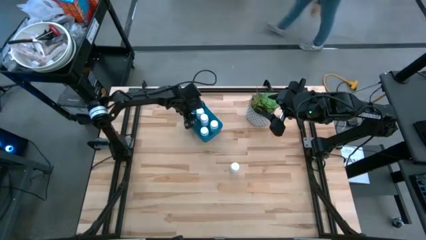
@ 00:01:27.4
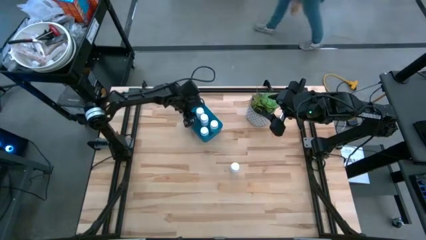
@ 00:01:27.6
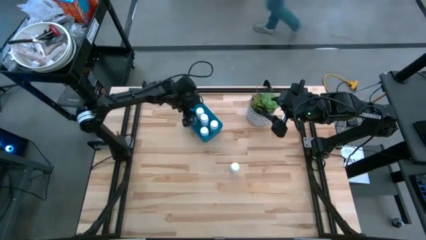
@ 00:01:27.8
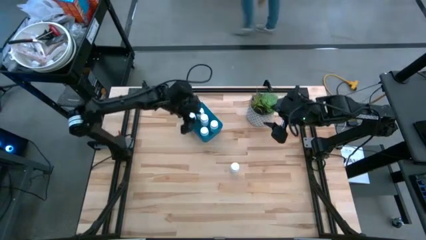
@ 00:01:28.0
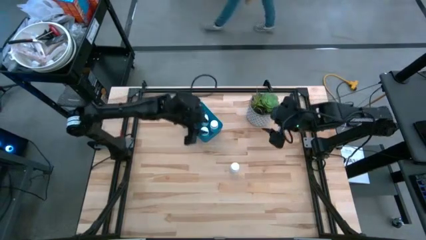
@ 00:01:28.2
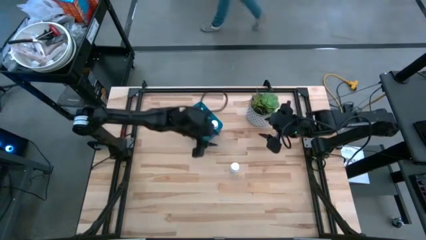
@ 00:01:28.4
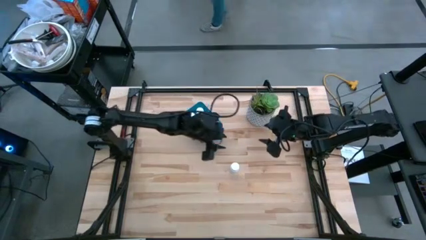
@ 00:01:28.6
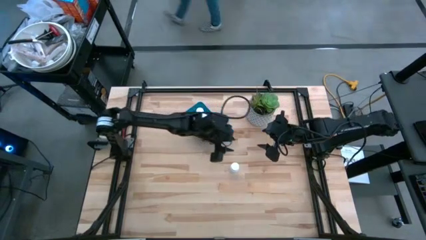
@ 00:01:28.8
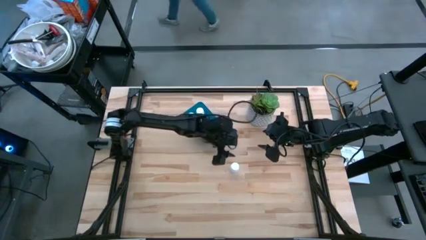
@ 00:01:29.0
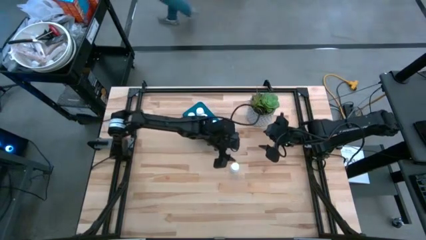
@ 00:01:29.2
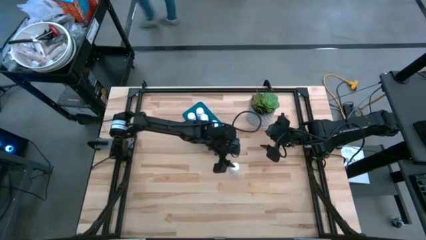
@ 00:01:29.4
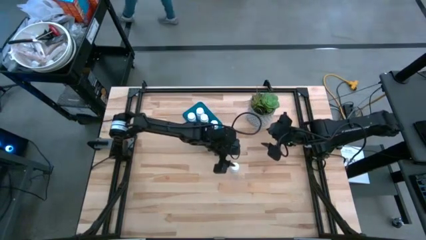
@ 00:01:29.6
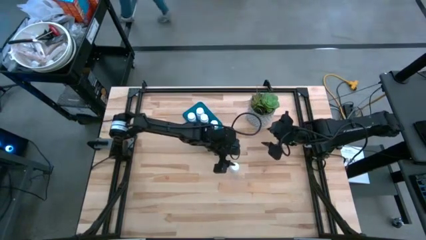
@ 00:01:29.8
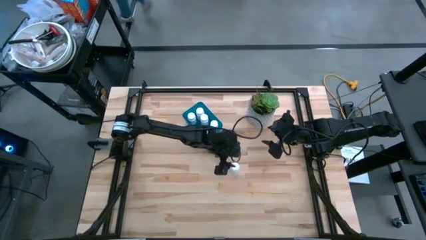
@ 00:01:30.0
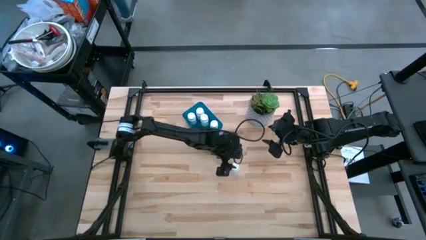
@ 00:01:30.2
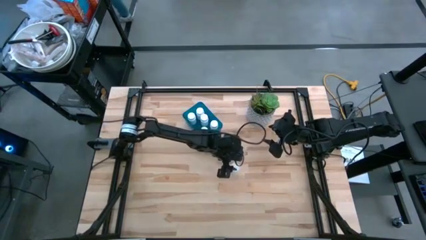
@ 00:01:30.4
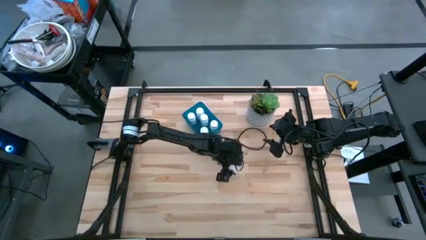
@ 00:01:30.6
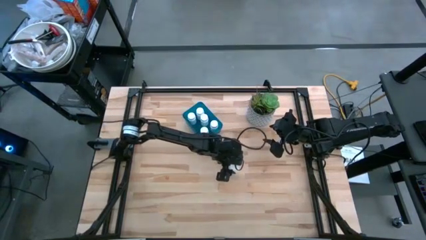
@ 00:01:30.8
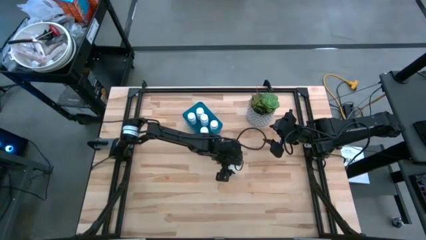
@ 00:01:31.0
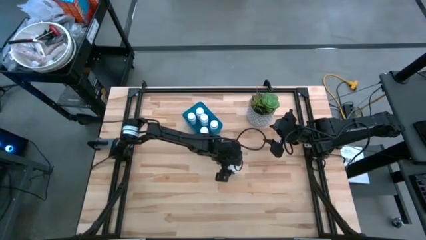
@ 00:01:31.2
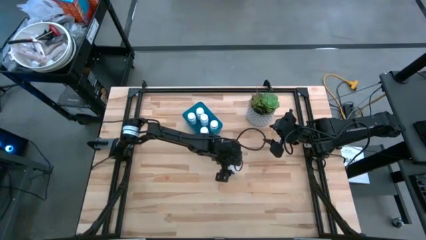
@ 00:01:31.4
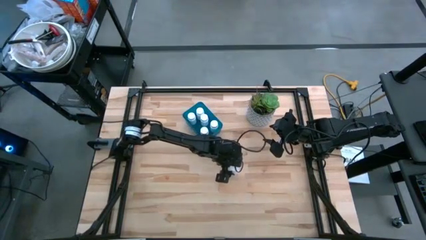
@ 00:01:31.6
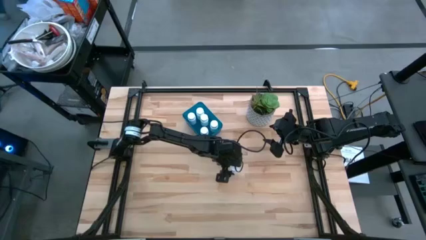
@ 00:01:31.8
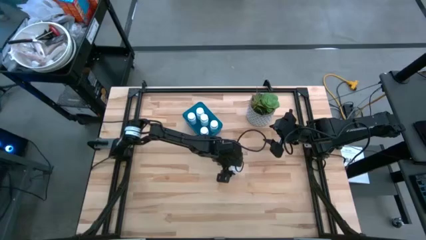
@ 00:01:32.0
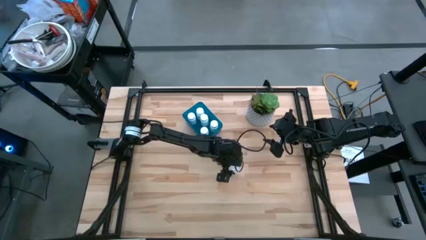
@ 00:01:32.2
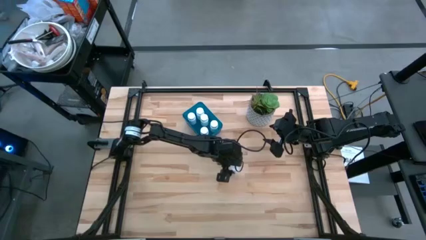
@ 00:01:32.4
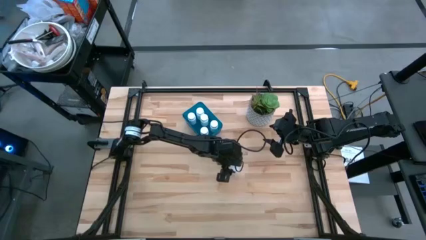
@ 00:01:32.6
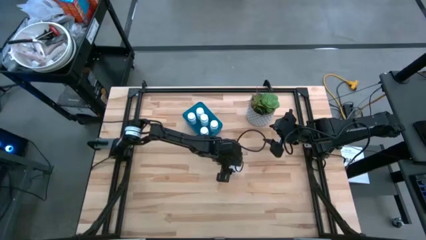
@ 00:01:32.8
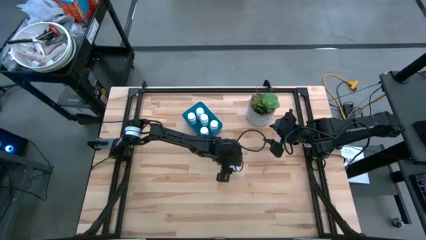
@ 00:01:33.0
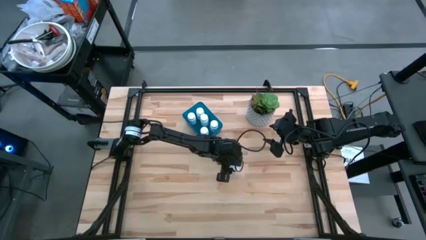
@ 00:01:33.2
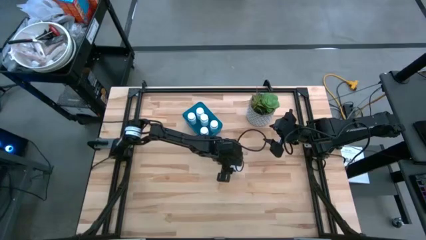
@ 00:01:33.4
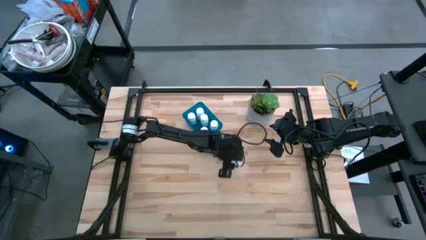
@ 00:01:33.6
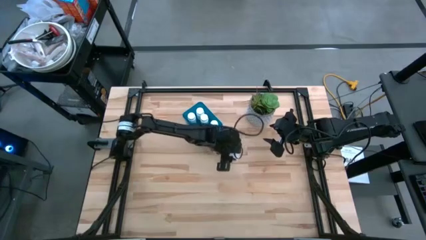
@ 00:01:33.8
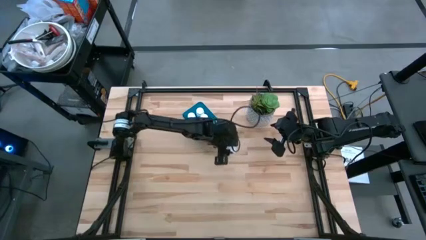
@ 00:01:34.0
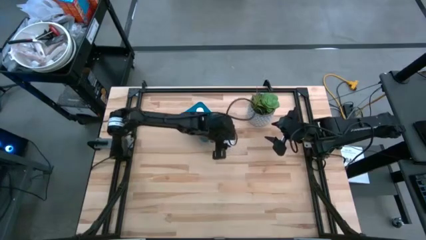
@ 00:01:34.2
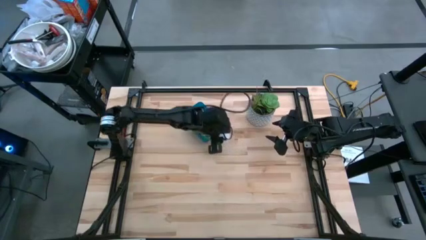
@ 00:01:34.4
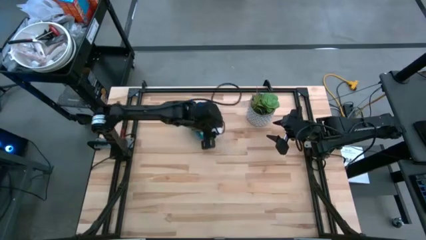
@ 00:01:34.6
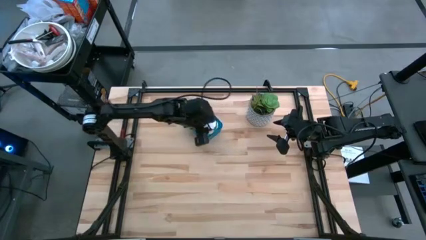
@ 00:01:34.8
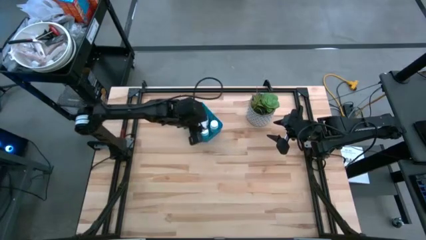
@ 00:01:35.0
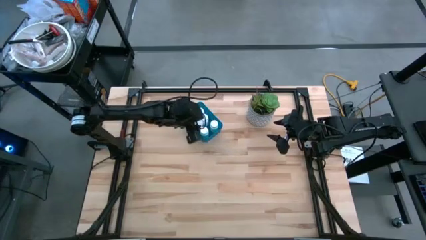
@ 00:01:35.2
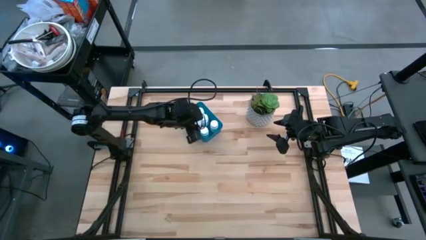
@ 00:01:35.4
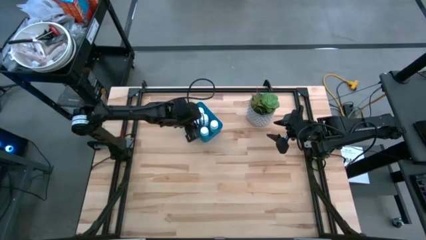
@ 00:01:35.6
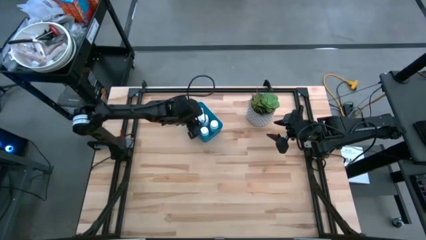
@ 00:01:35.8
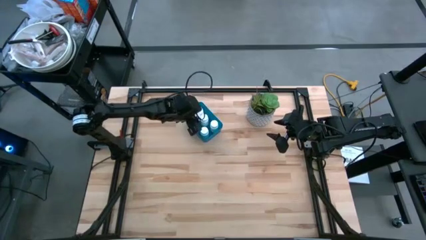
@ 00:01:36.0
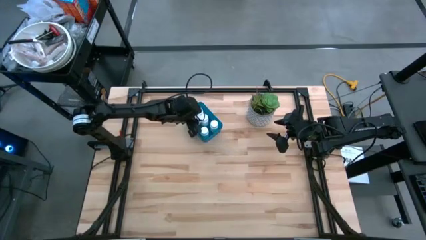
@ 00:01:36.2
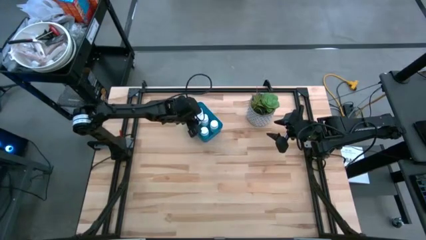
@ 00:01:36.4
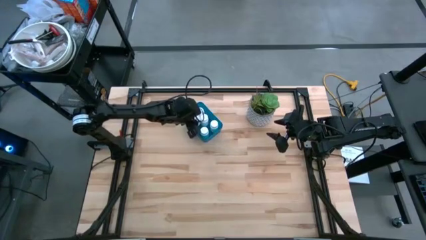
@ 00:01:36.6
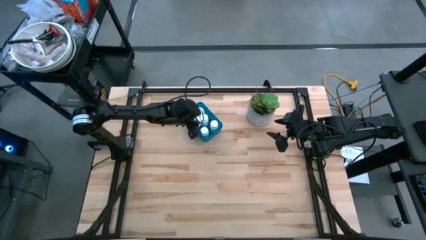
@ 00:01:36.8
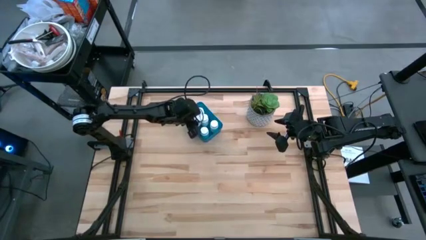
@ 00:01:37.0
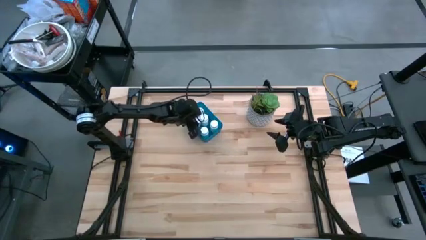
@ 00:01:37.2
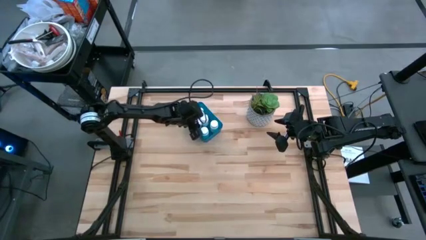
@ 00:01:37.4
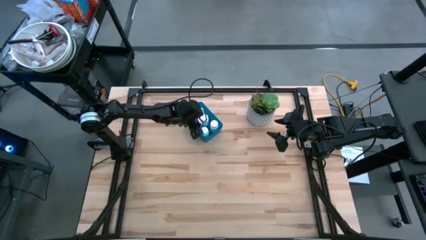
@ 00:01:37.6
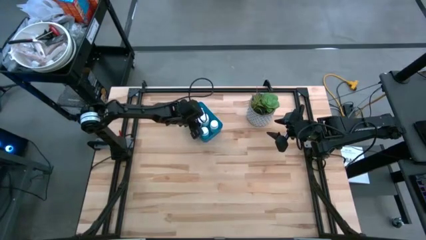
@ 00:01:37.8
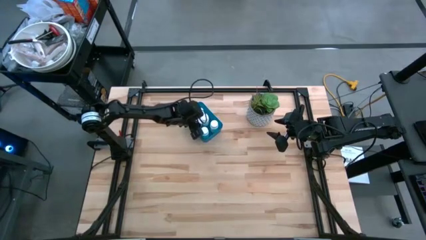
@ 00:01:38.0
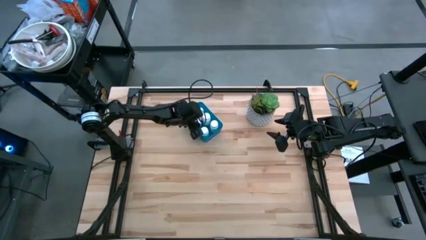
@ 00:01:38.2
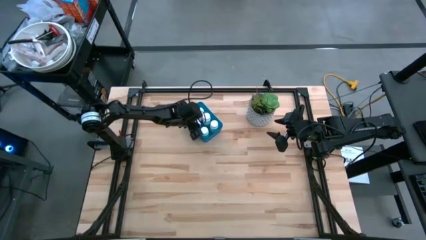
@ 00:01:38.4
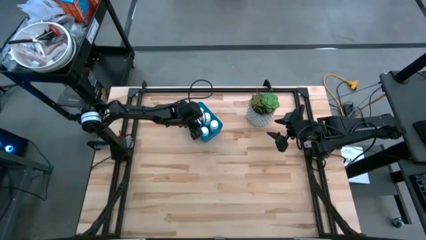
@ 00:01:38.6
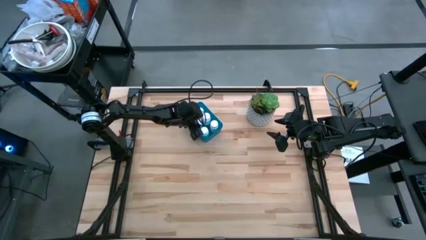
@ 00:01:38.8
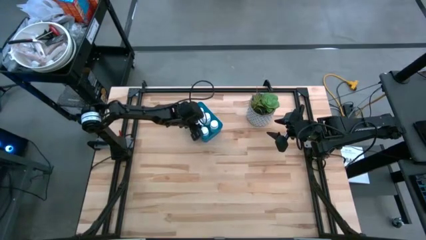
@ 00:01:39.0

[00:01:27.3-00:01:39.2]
Task: Pick and place pill bottles into a basket
Put the white pill bottle into the dark blue bin

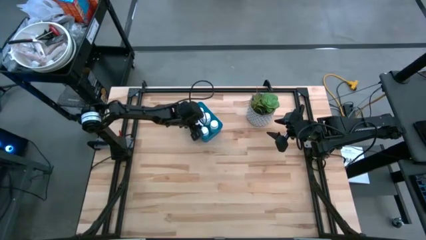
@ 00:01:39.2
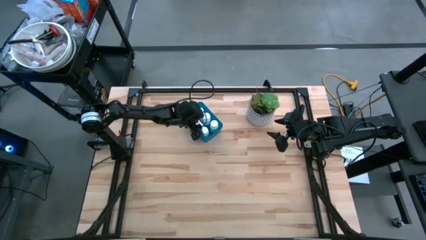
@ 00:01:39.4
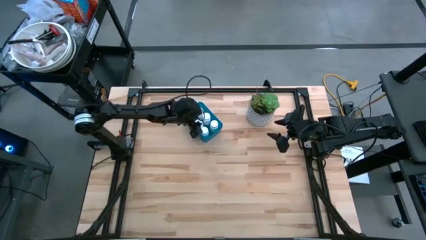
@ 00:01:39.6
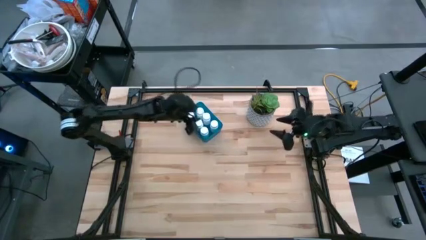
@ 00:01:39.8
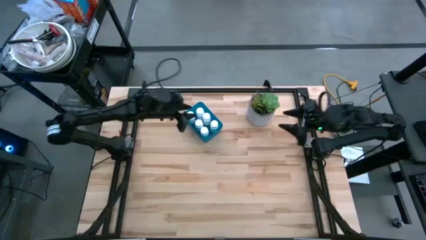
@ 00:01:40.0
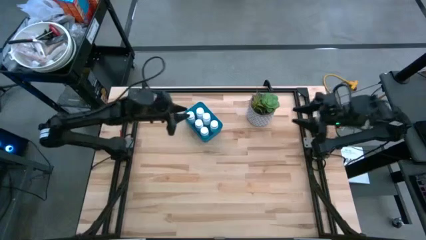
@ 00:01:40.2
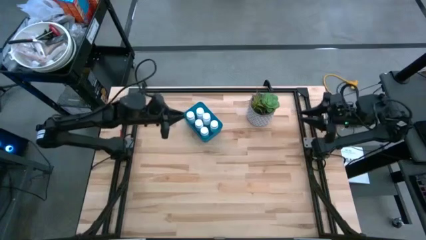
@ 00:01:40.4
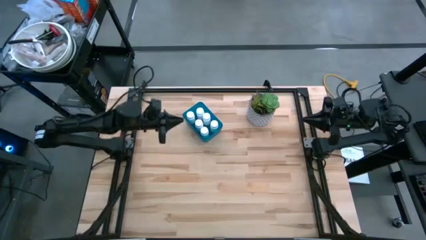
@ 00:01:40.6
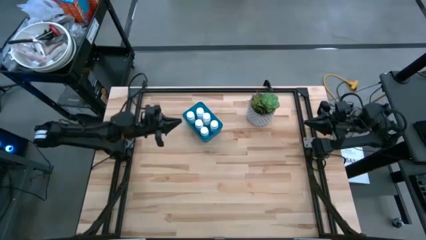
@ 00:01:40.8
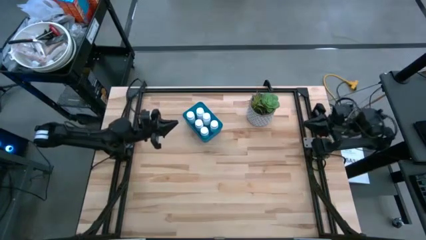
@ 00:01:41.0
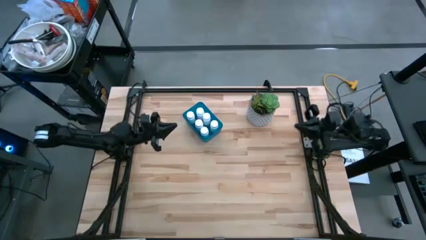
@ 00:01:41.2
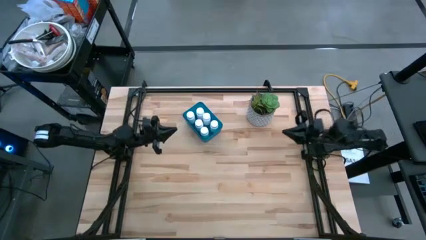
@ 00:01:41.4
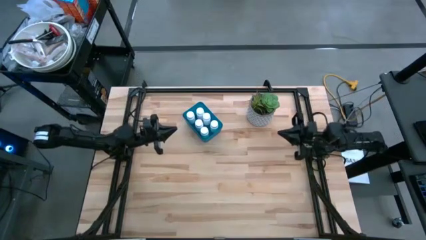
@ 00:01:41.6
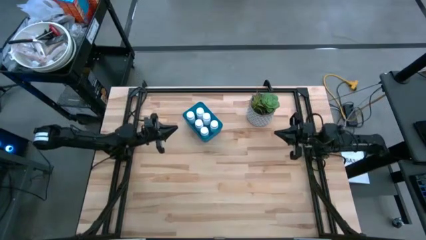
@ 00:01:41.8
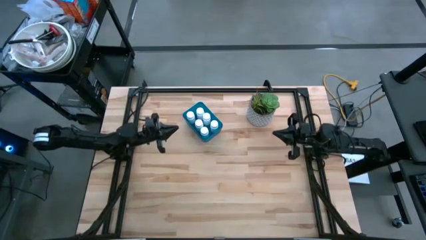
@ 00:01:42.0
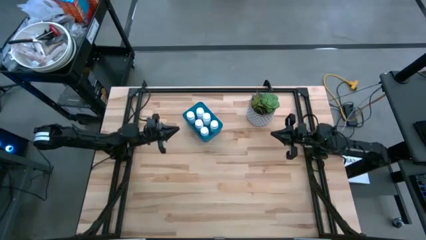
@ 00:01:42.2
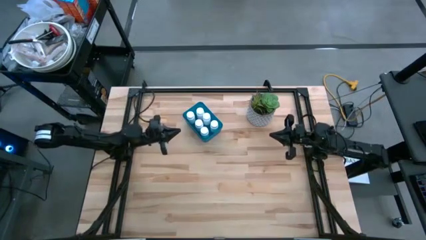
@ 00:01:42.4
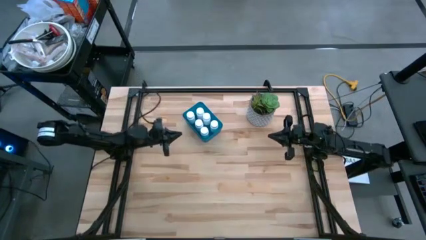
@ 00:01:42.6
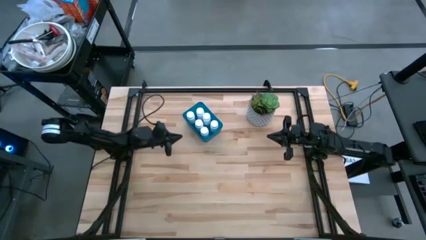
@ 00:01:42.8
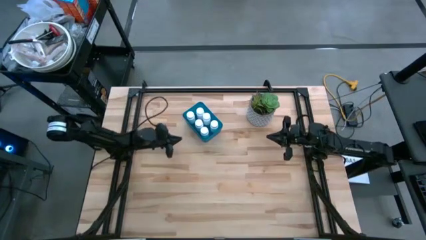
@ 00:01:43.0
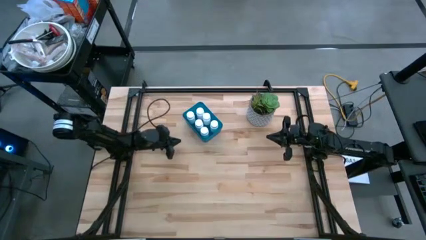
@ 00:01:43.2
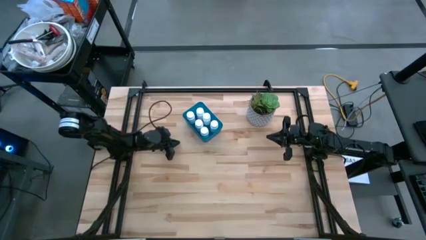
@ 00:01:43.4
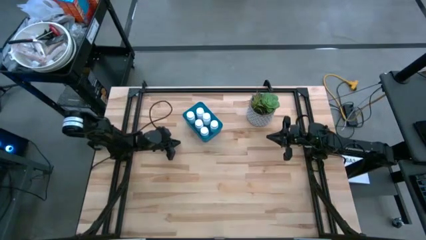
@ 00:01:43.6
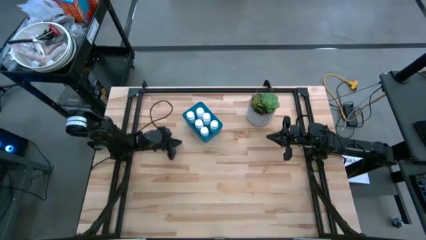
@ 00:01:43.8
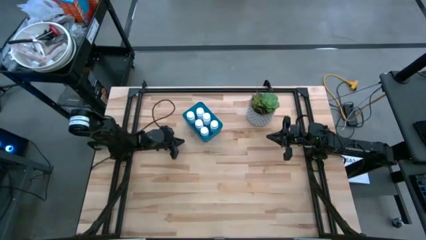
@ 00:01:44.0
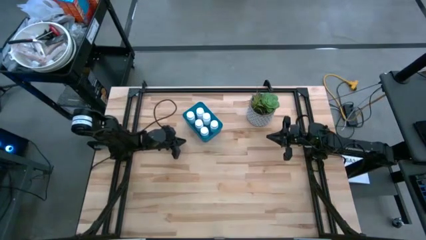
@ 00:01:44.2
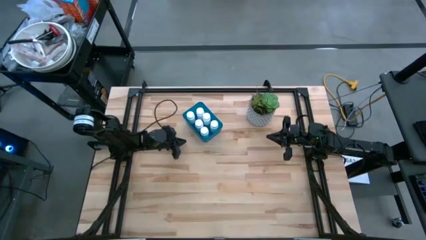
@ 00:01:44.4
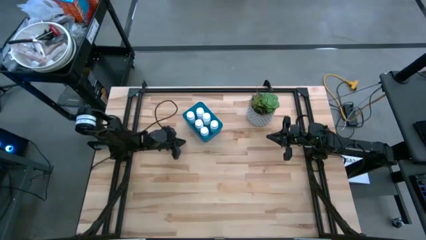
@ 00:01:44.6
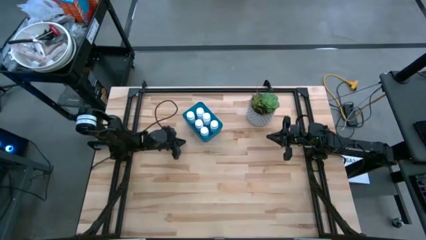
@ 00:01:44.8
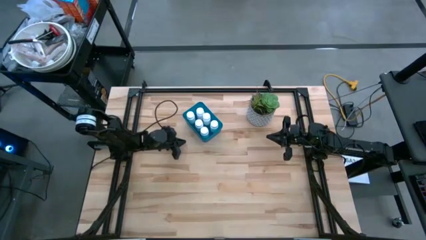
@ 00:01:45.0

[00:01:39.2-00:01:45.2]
Return to Home Position
